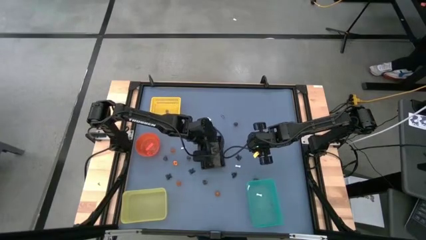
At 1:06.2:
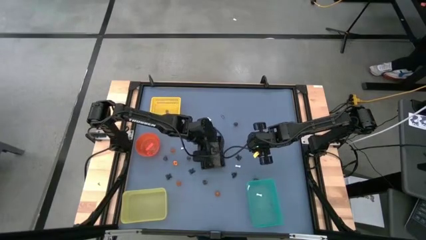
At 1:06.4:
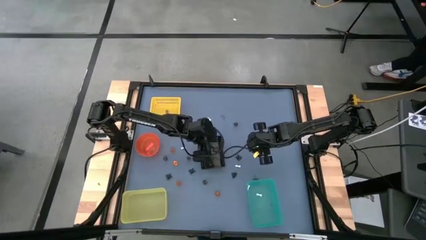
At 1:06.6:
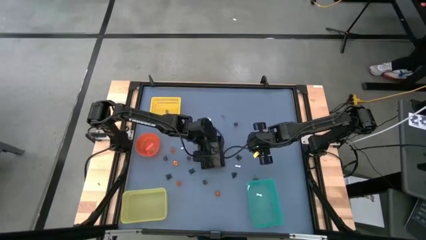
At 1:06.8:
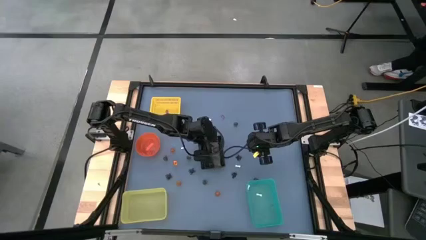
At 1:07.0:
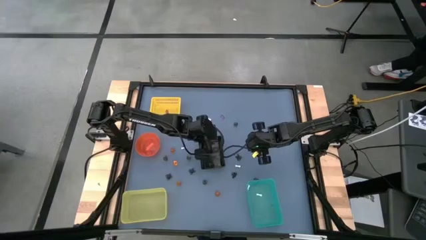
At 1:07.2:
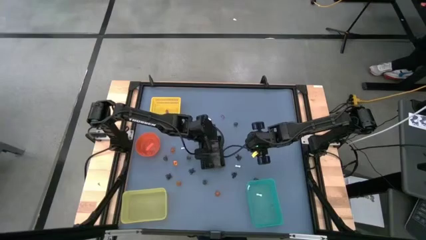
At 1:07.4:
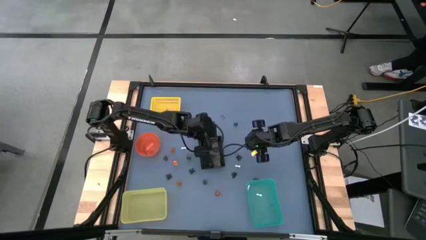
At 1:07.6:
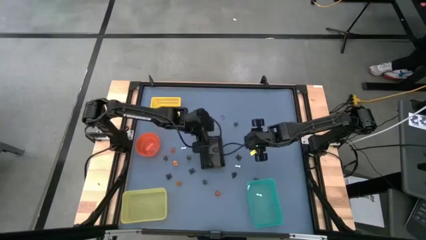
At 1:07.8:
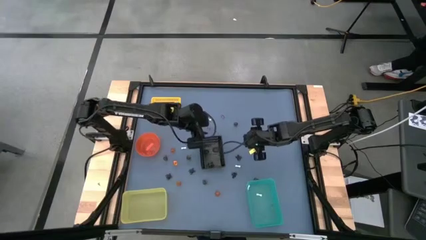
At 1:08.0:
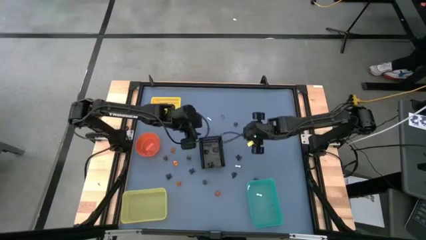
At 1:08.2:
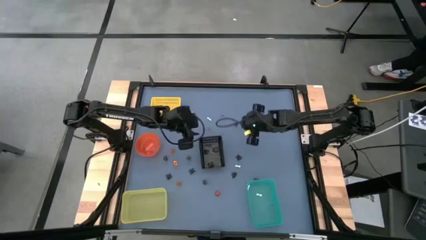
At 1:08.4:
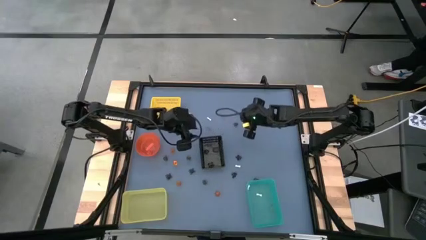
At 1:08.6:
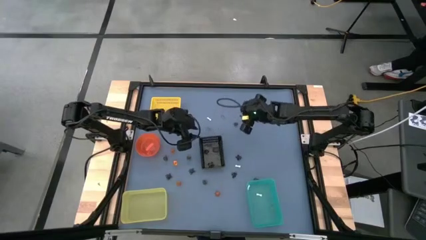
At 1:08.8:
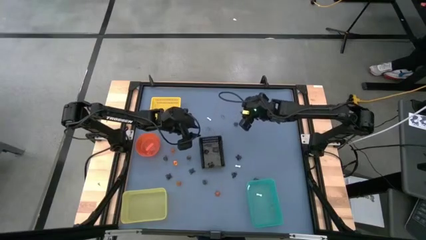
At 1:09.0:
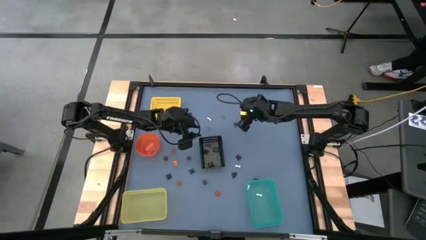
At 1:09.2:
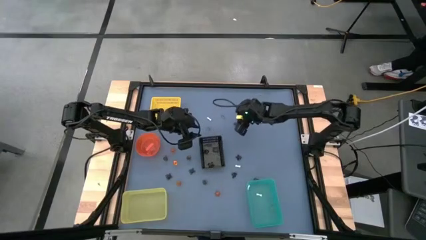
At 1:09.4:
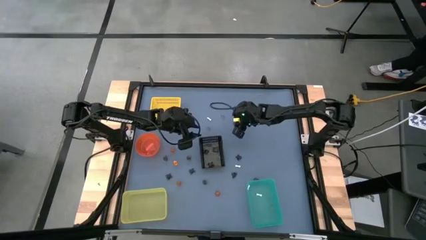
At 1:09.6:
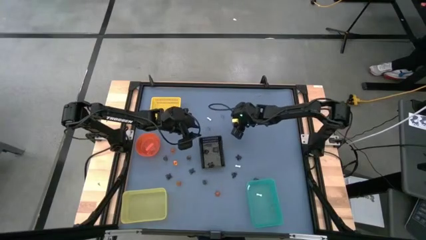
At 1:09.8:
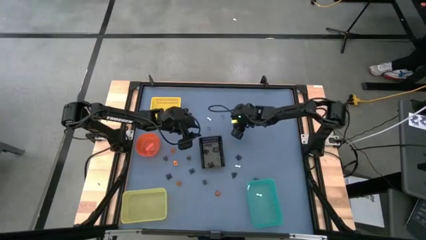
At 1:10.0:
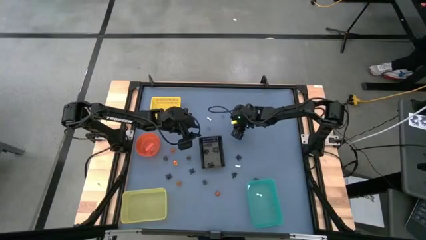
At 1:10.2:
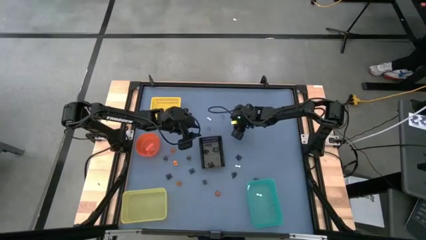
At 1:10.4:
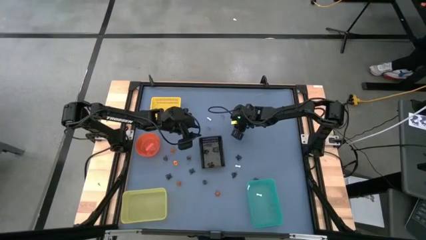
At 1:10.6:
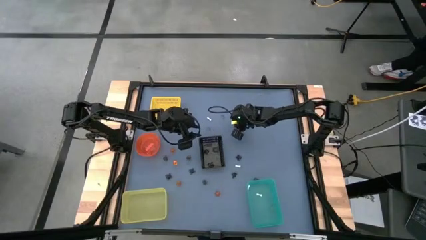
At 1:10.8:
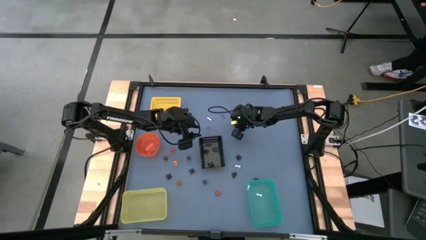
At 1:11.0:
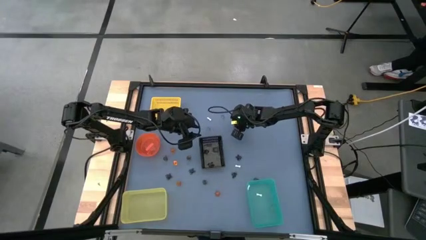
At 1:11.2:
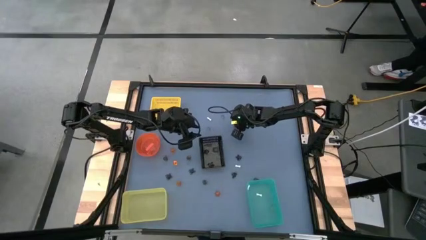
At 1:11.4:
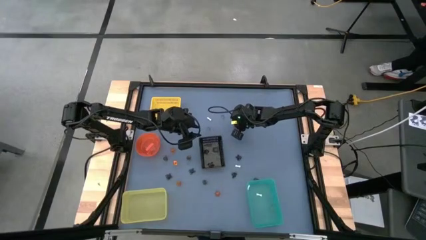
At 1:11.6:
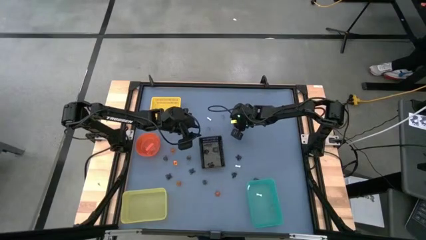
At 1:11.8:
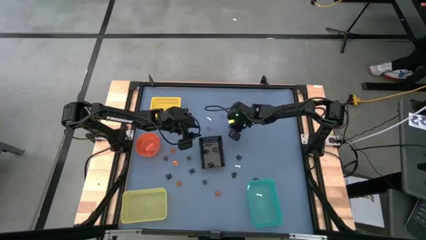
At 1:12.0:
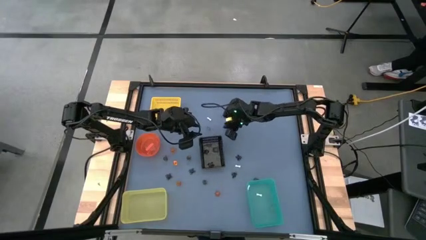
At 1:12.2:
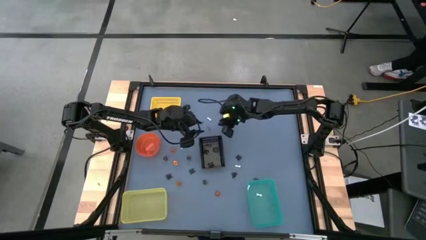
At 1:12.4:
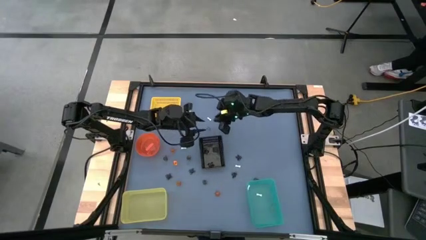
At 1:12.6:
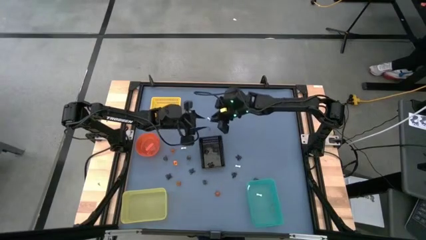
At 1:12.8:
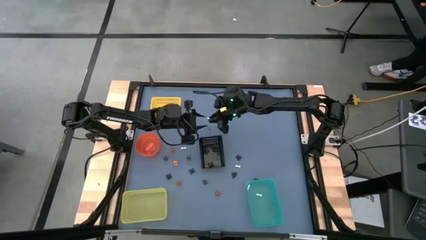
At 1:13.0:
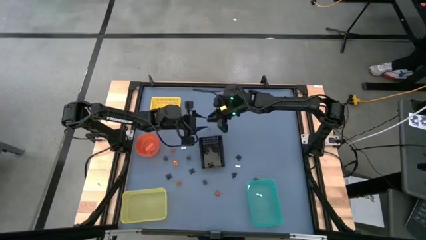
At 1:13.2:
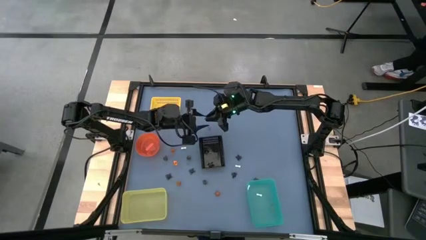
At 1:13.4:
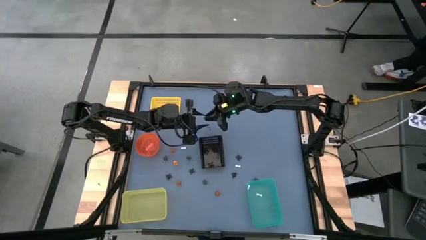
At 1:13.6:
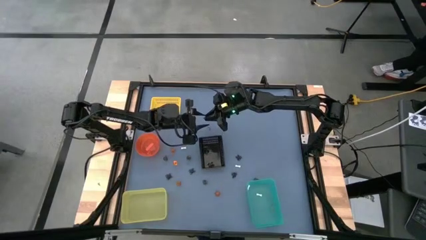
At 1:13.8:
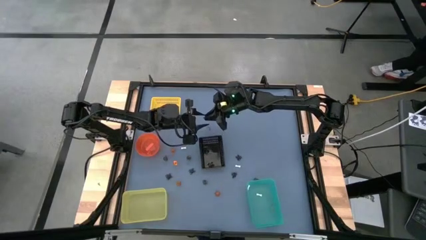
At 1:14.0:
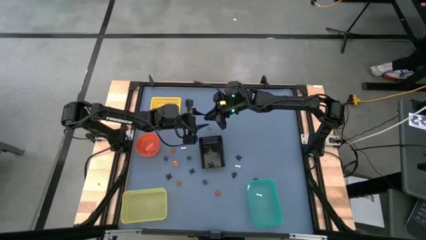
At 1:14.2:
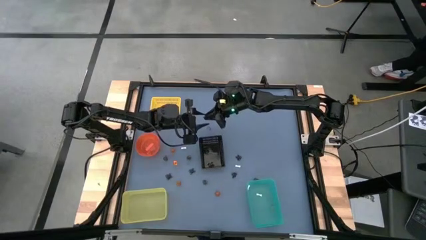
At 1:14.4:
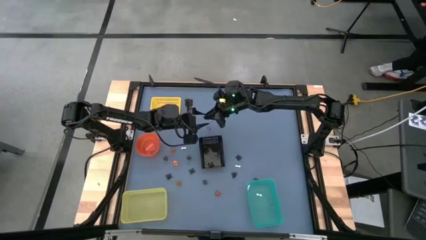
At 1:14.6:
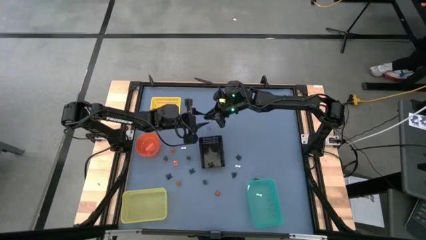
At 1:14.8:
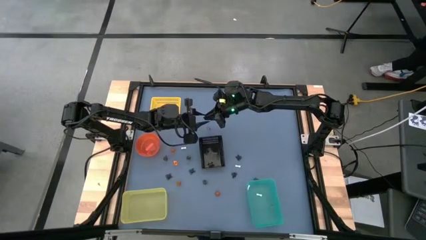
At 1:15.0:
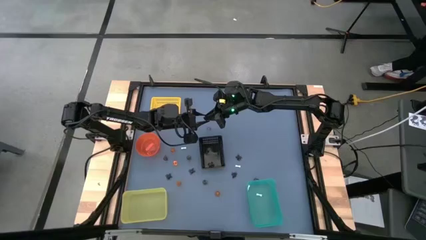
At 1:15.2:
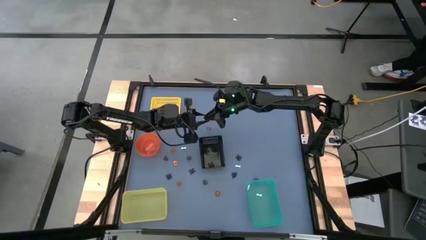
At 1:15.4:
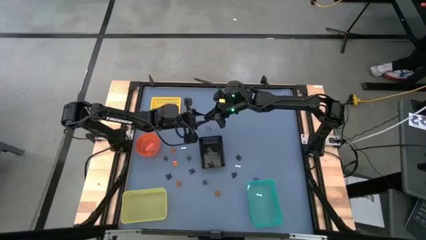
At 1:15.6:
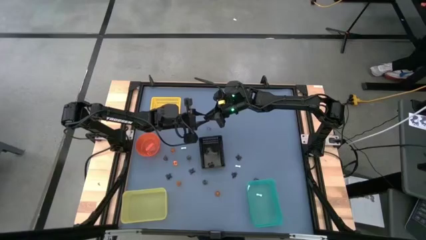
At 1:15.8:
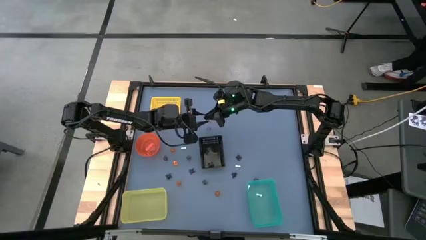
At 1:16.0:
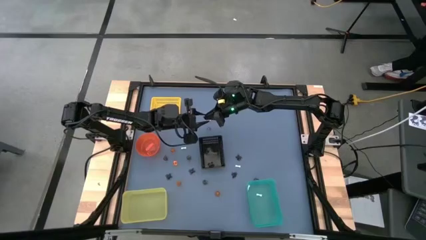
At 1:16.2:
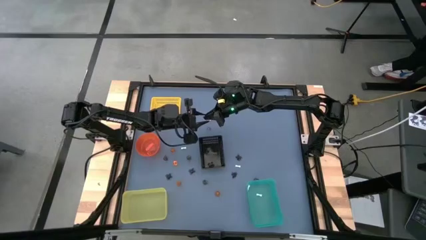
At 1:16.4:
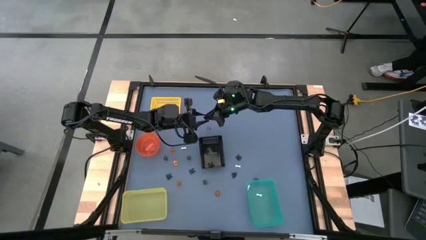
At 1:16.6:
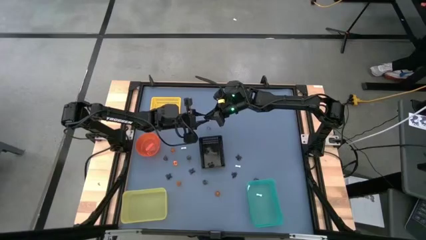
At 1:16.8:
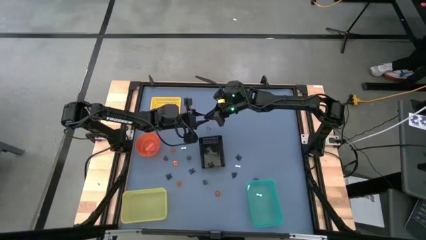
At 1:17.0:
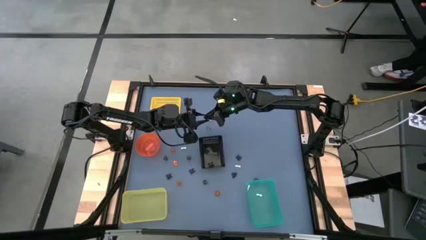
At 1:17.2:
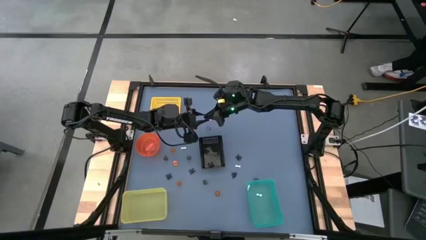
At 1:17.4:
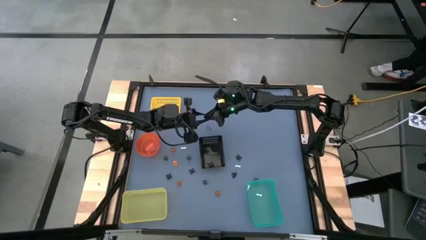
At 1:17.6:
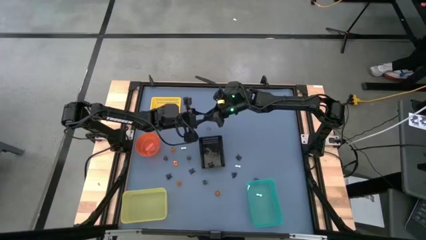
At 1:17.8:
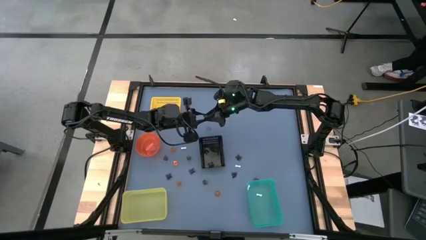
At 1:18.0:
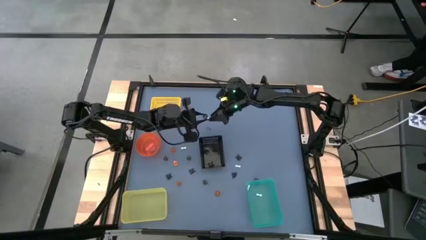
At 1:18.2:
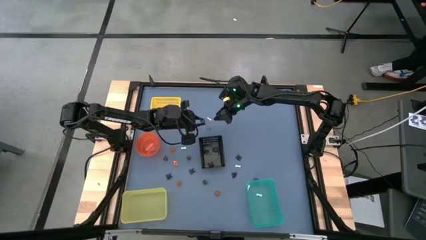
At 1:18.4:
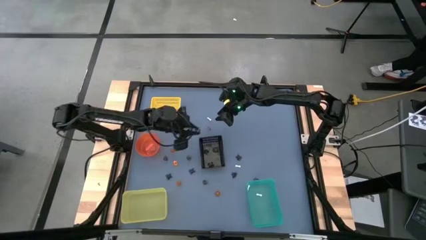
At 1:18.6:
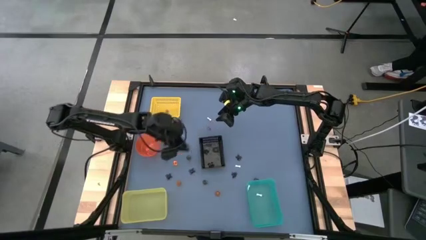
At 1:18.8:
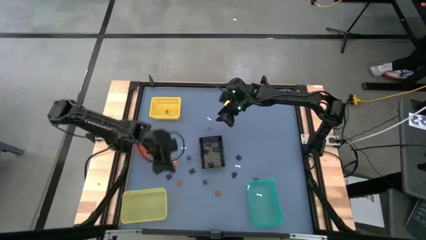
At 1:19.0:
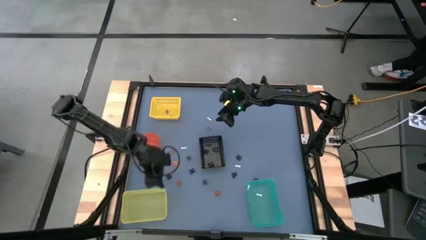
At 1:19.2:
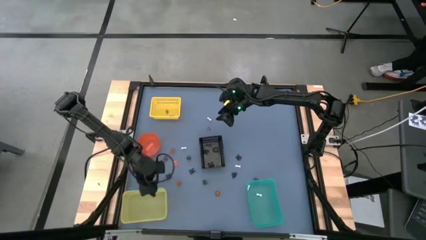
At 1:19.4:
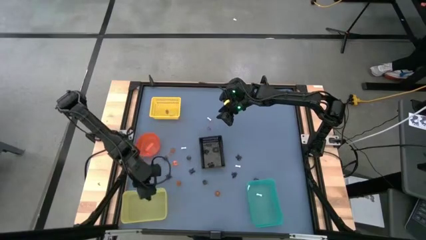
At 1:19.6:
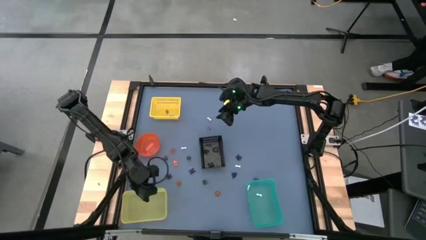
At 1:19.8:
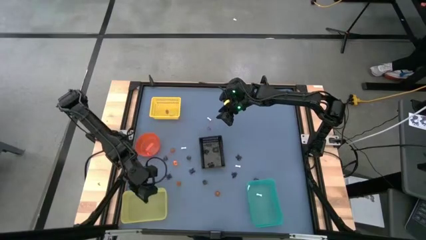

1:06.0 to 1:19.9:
Task: Sort Halloween decoration
Put the black skull toy into the bottom yellow bin
